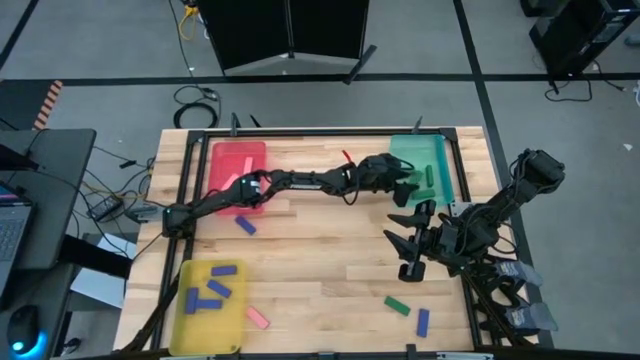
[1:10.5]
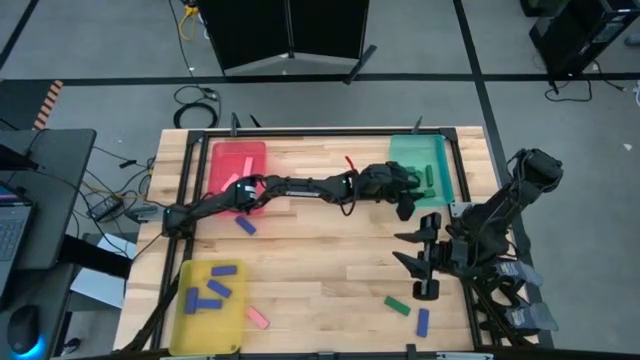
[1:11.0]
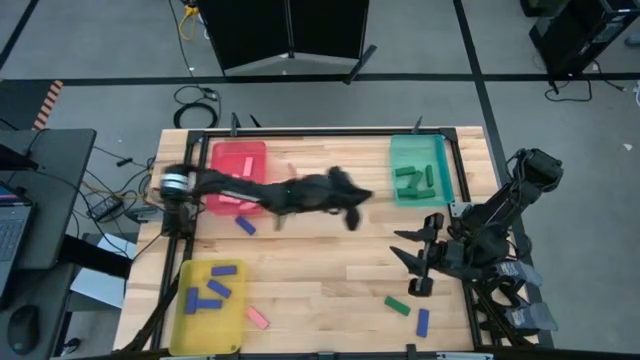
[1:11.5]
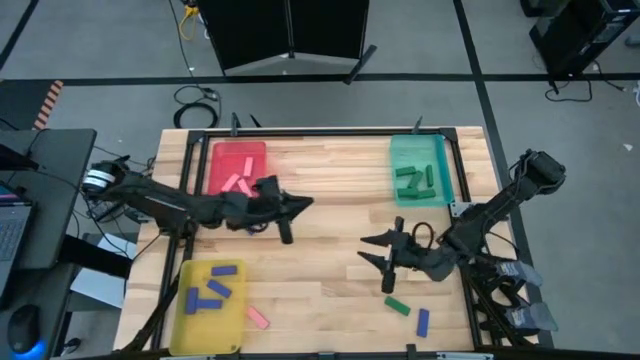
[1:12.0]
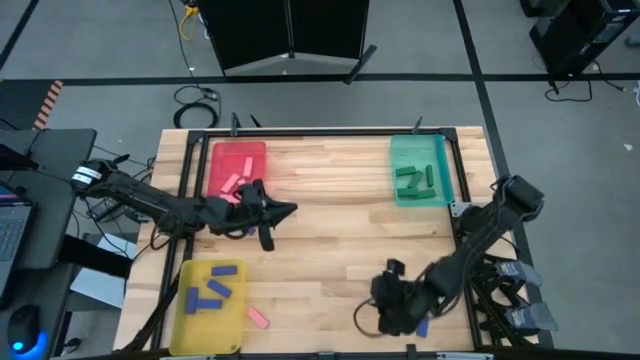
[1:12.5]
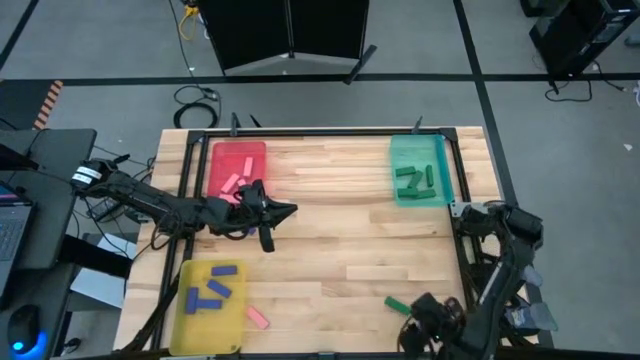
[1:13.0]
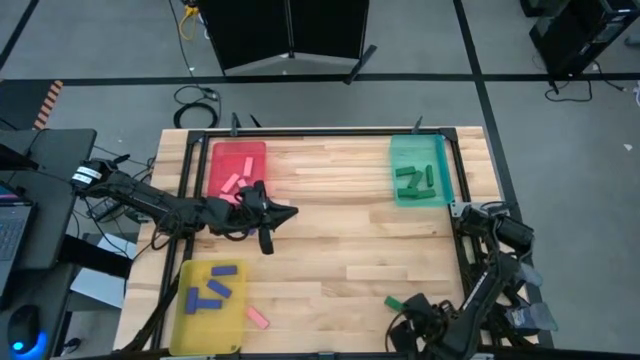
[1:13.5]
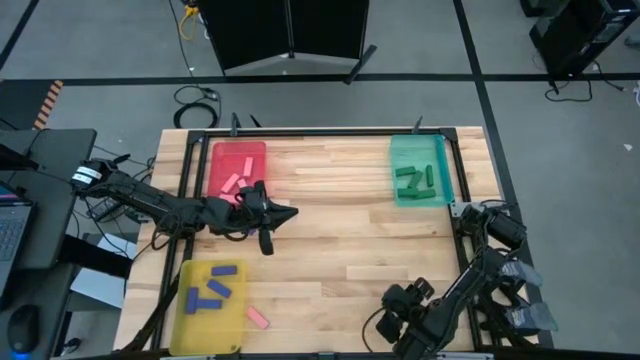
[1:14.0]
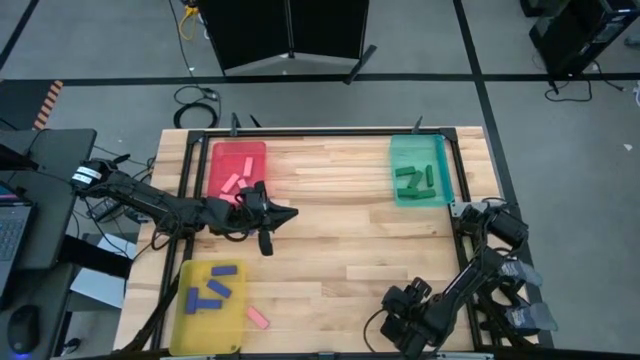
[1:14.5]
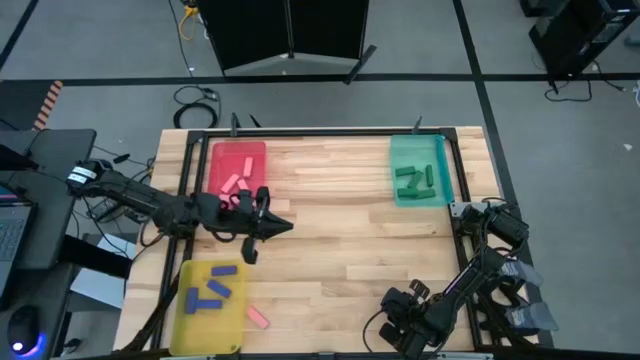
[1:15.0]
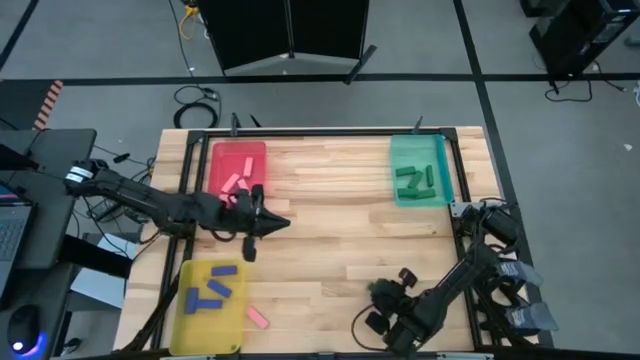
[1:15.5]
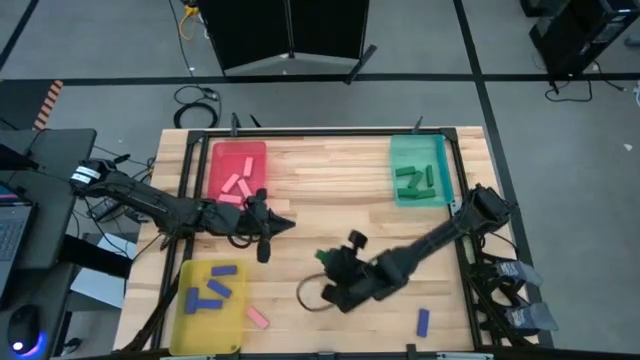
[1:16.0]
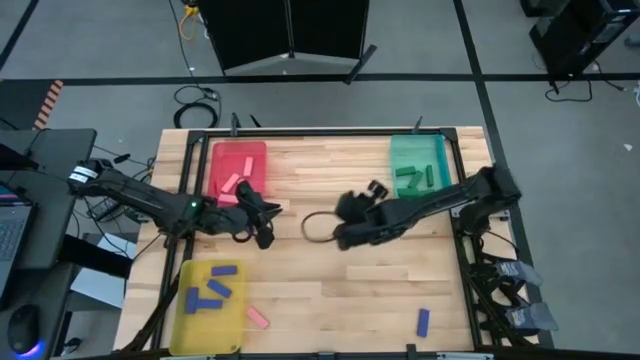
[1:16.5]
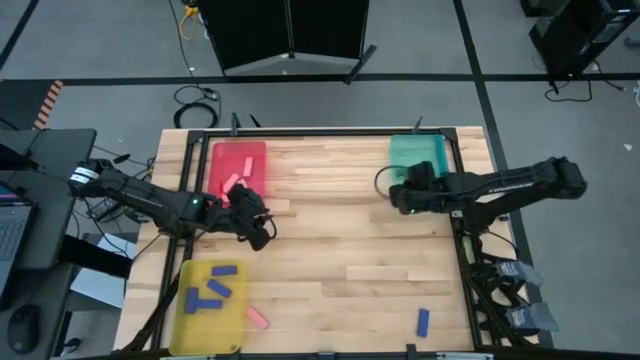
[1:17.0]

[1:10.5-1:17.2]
Task: Sort blocks
Put the green block into the blue bin

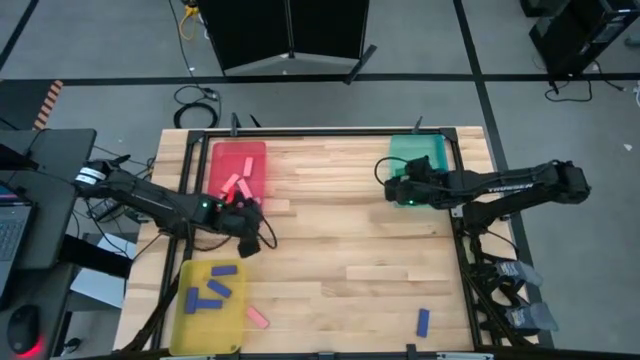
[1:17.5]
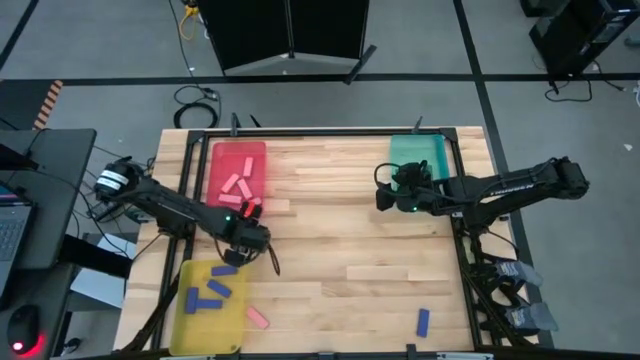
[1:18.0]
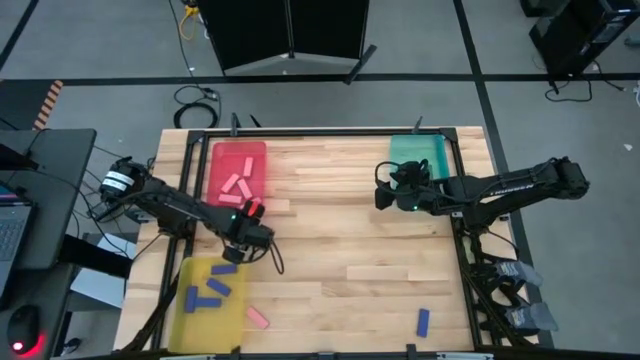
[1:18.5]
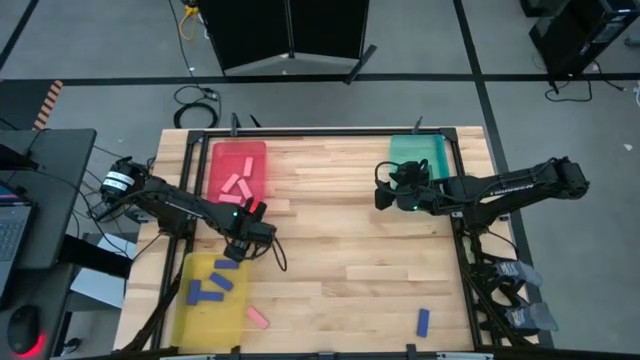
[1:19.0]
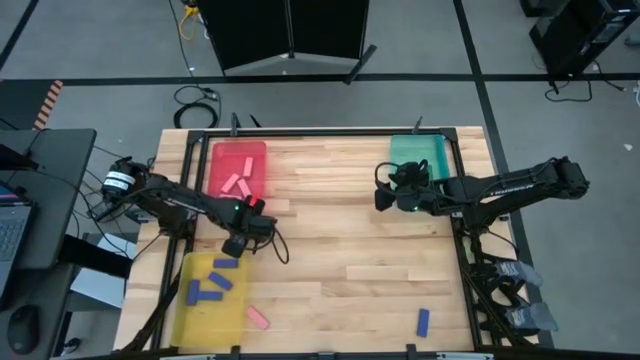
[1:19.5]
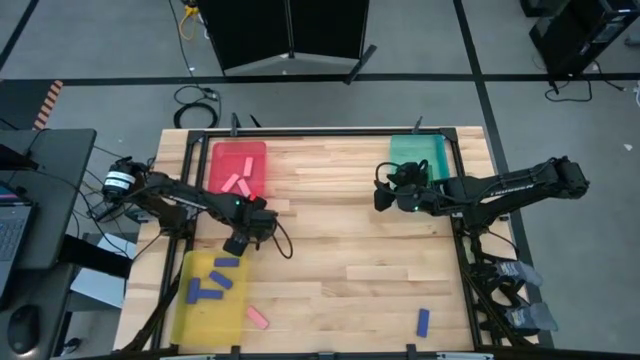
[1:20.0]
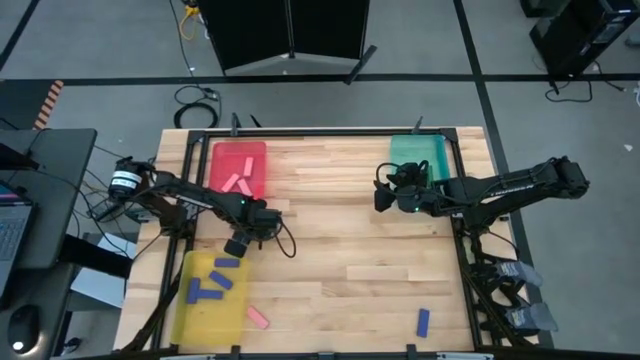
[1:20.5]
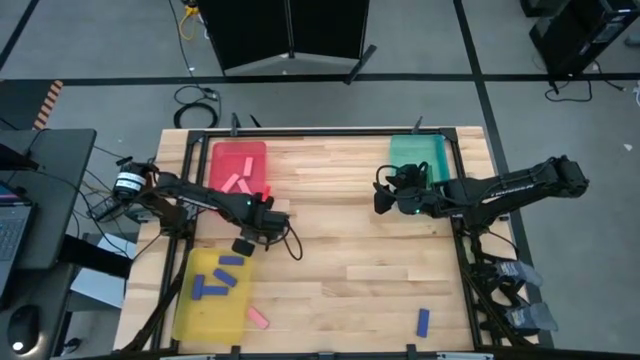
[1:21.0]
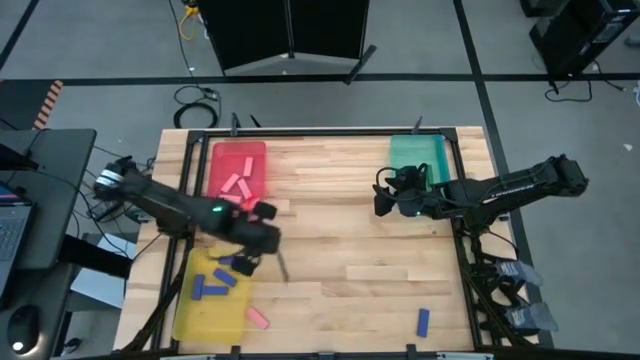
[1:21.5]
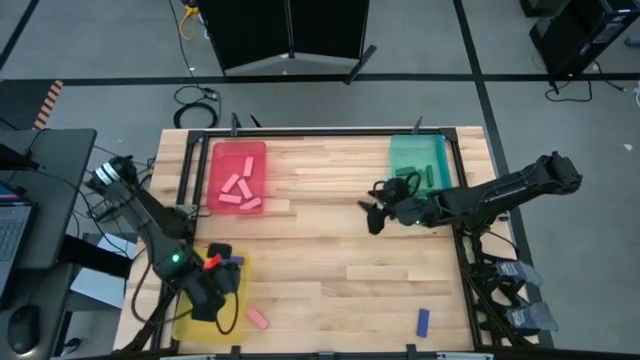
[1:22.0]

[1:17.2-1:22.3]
Put the blue block into the yellow bin

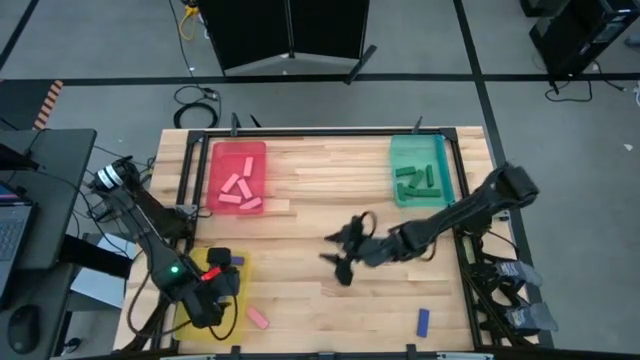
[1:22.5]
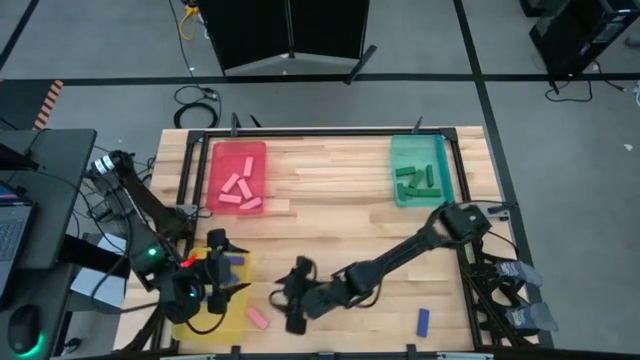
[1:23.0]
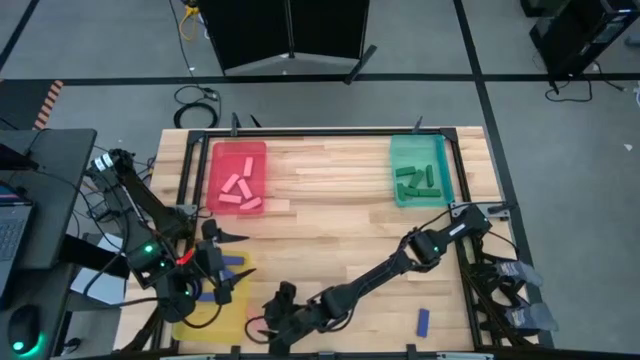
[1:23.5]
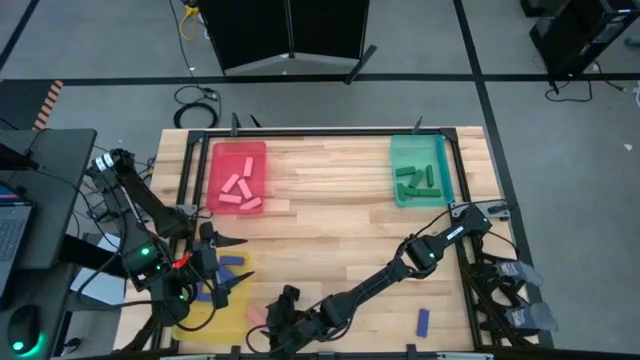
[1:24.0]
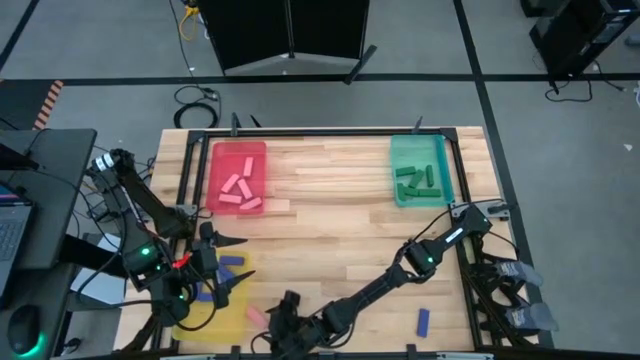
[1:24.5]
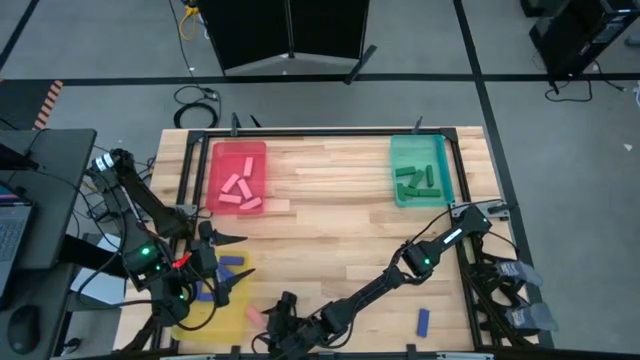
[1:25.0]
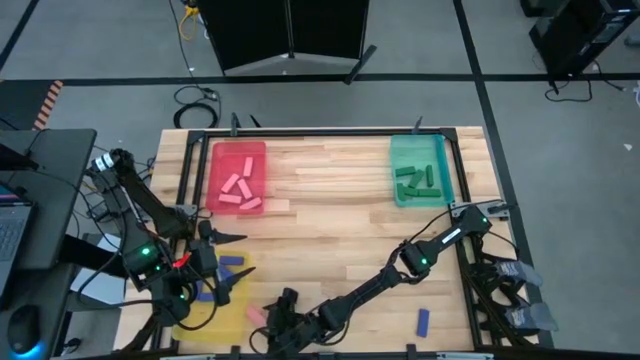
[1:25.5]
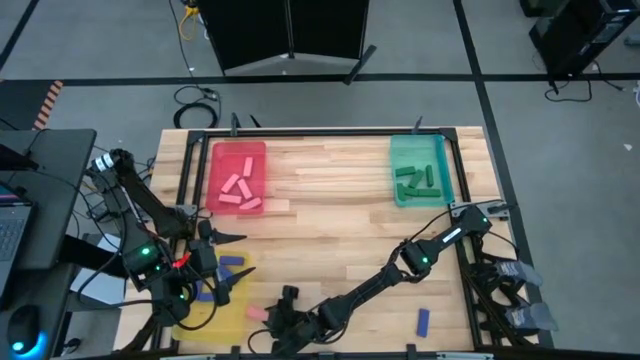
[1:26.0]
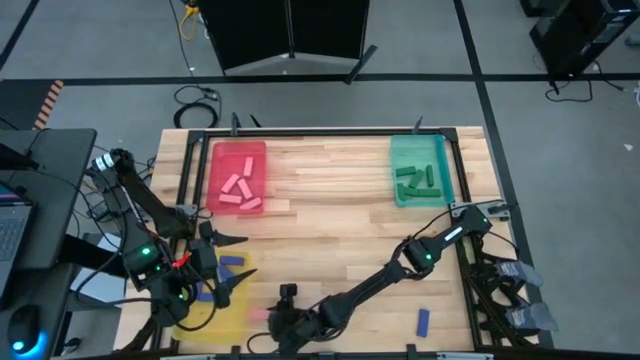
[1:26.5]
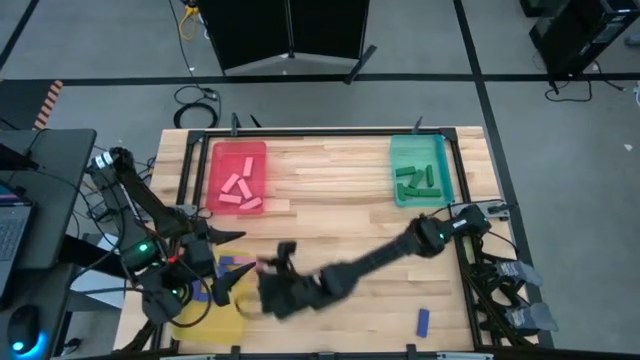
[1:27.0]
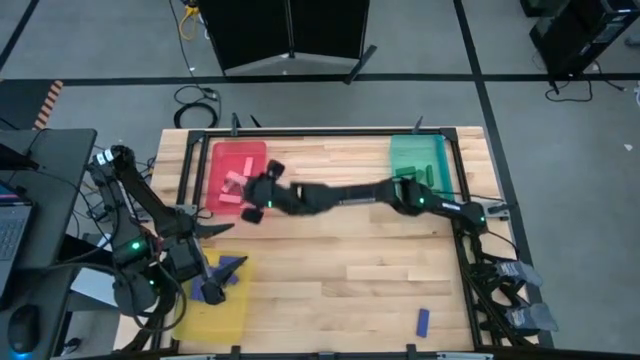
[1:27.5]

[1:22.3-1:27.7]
Put the pink block into the red bin

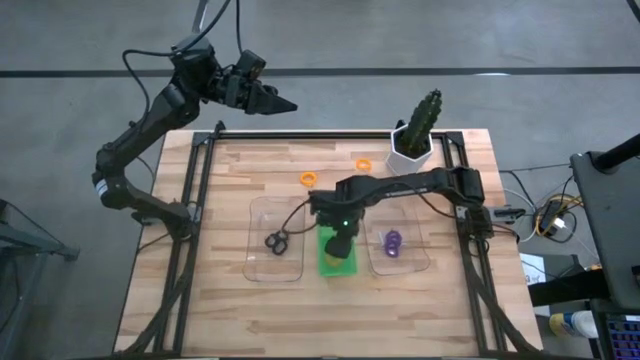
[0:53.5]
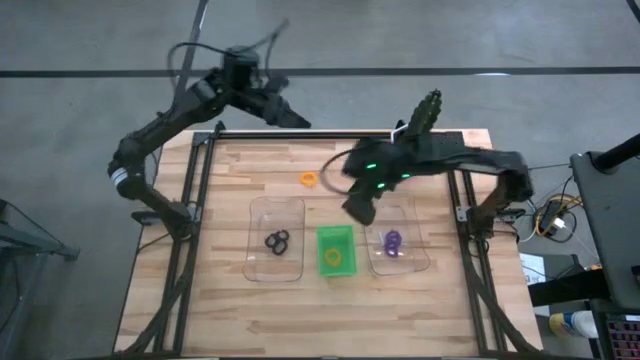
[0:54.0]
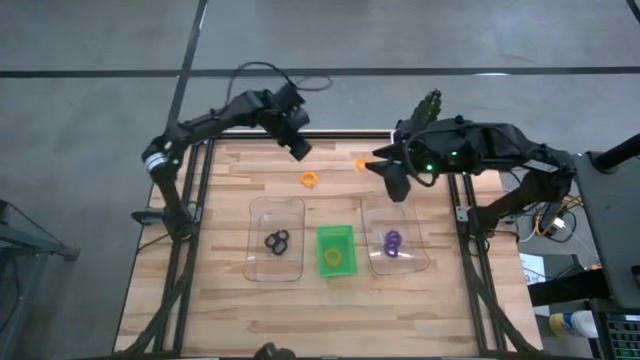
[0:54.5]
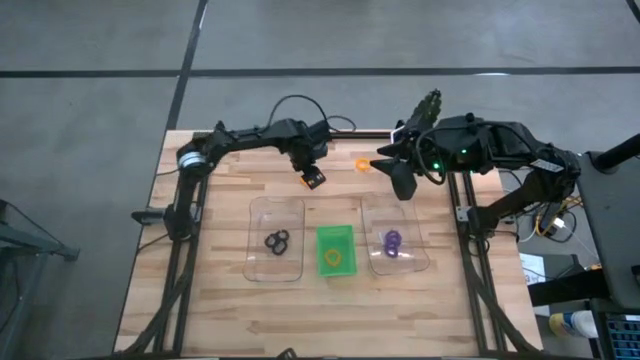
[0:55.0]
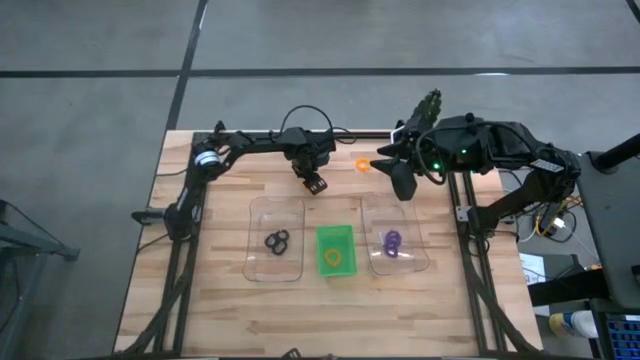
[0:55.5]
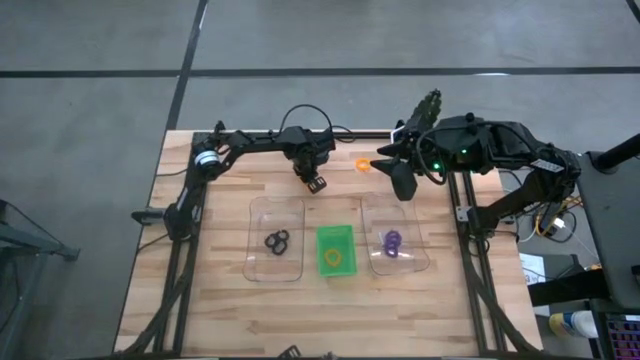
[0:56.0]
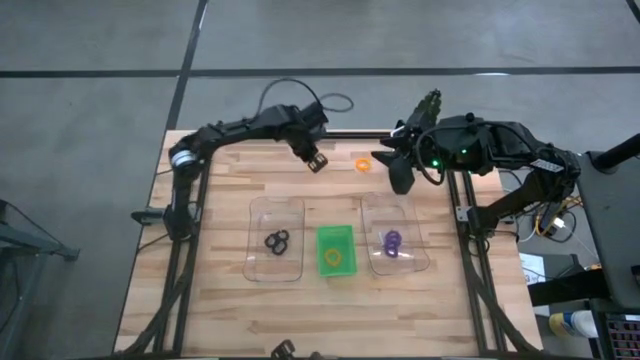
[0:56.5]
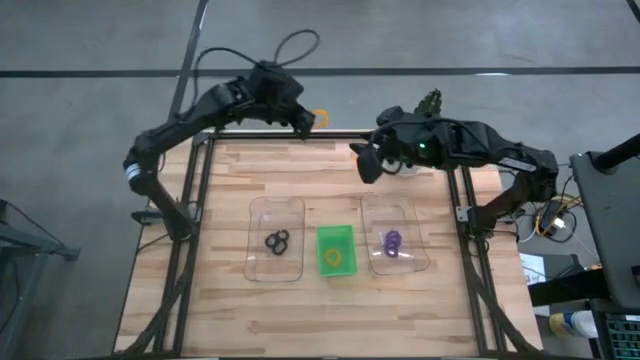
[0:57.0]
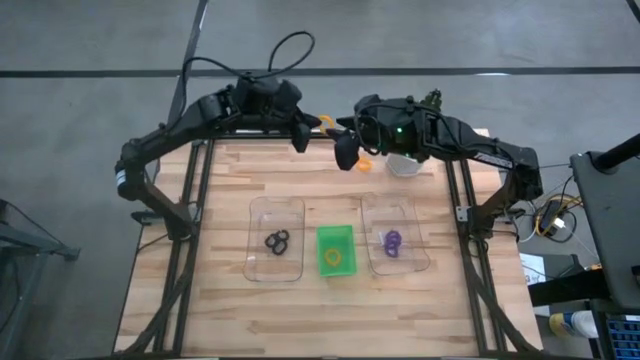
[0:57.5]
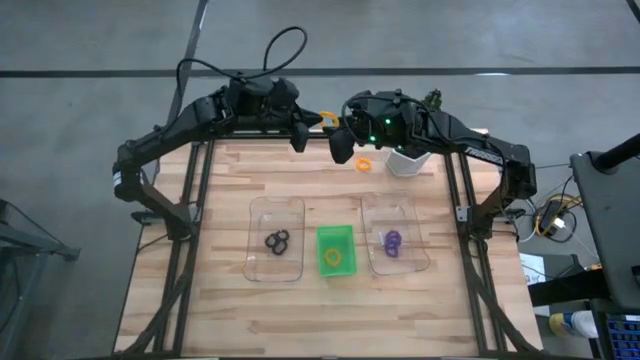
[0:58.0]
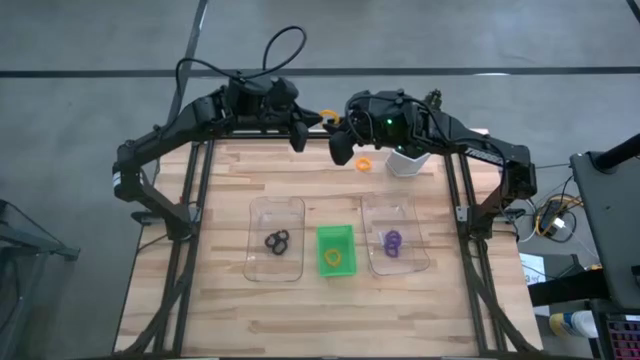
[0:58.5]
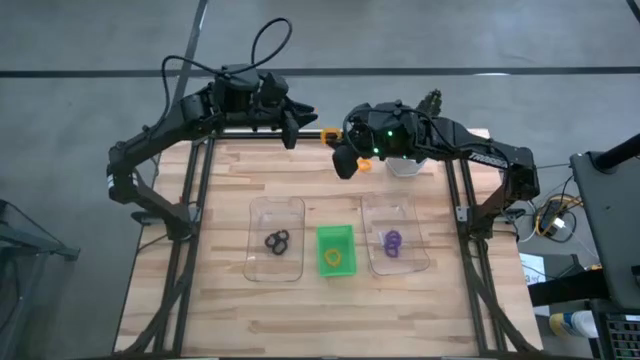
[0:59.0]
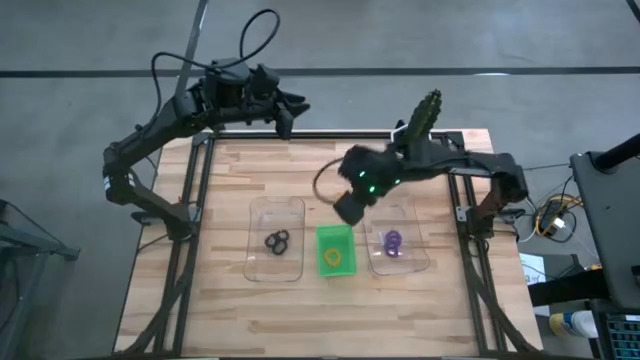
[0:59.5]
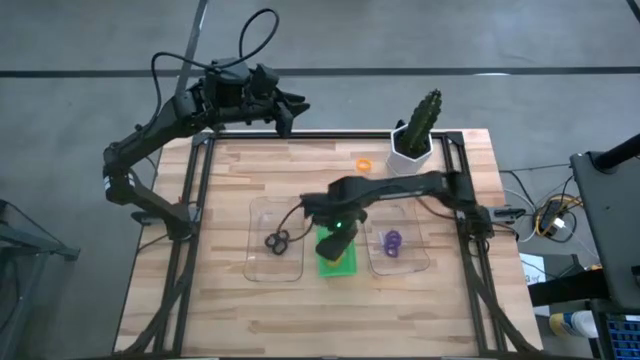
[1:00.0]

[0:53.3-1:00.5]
Task: Sort spring keychains
Put the left yellow spring keychain into the green bin
